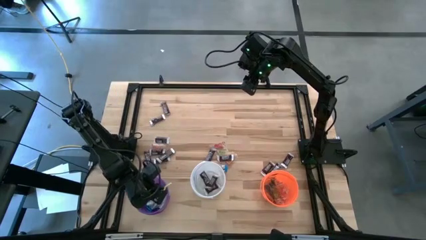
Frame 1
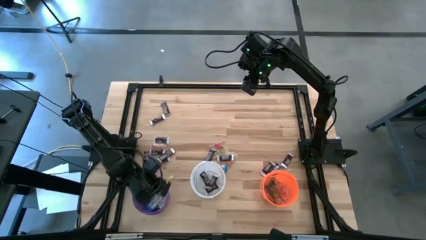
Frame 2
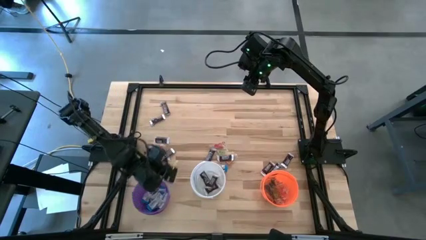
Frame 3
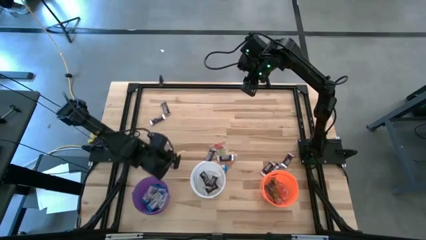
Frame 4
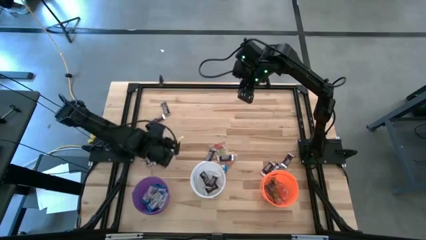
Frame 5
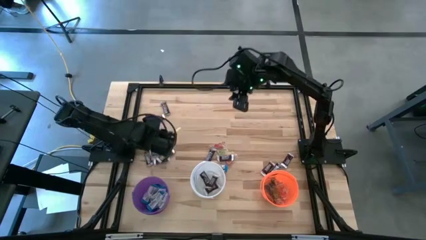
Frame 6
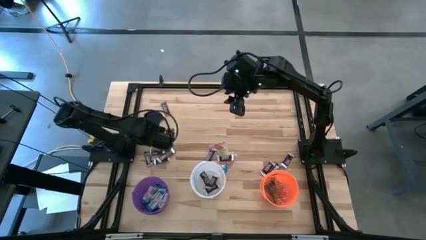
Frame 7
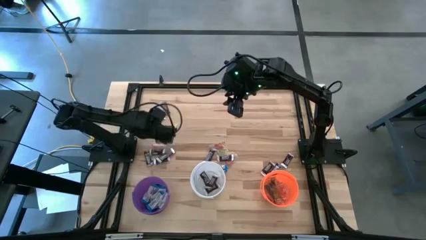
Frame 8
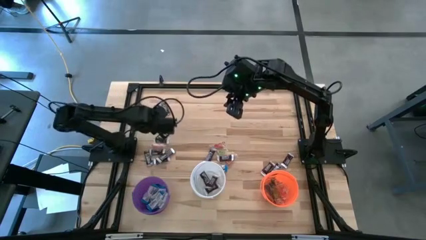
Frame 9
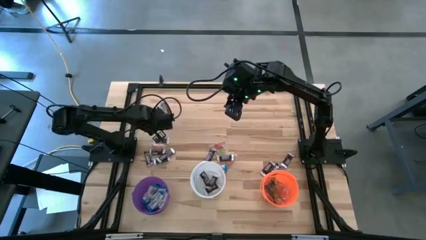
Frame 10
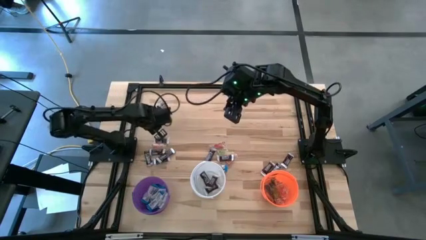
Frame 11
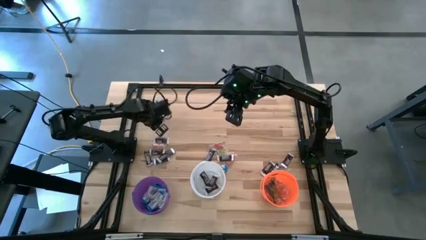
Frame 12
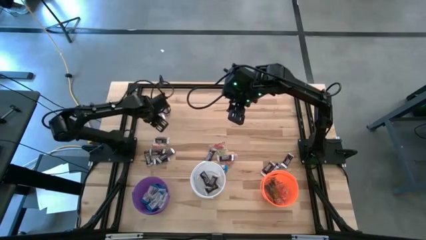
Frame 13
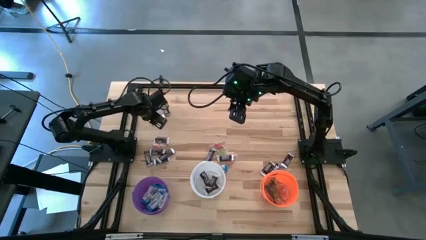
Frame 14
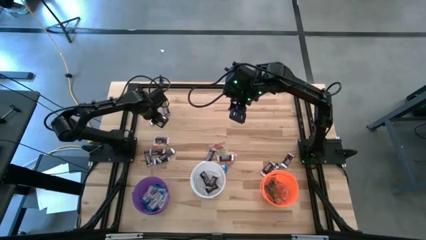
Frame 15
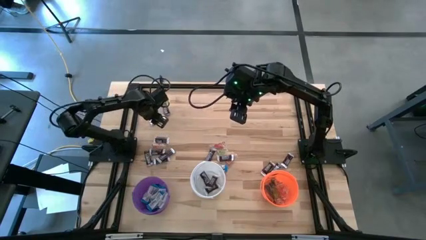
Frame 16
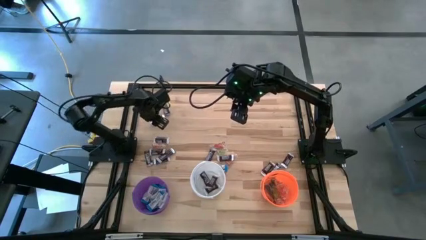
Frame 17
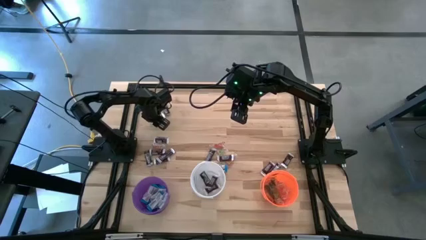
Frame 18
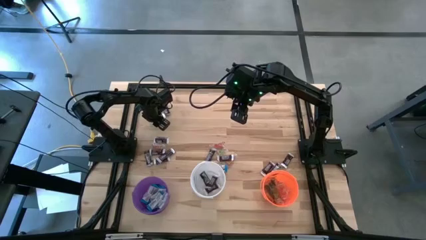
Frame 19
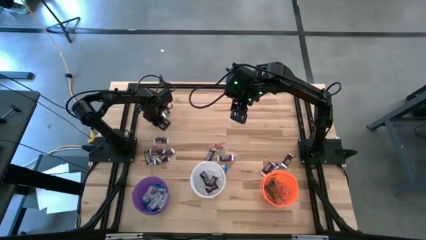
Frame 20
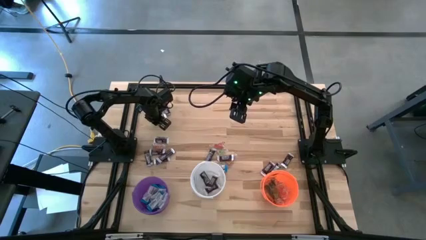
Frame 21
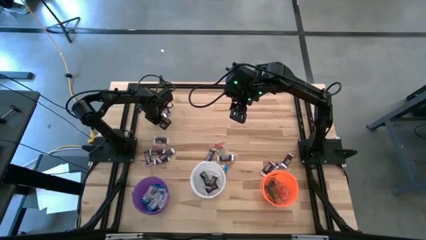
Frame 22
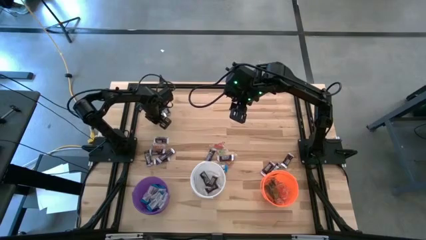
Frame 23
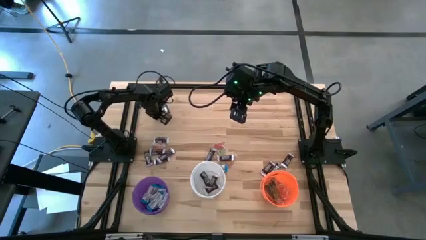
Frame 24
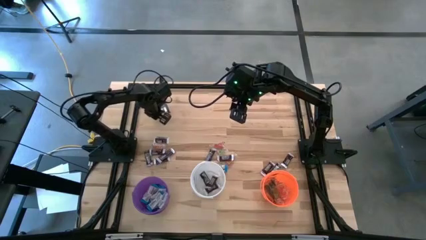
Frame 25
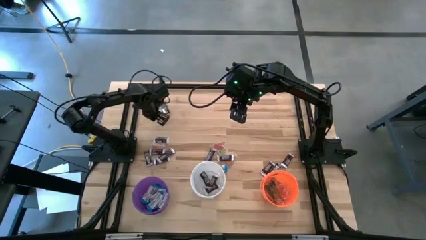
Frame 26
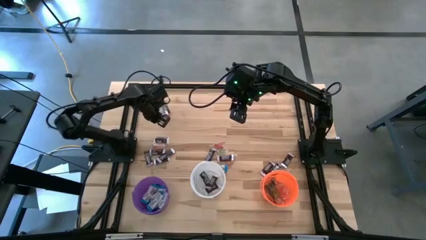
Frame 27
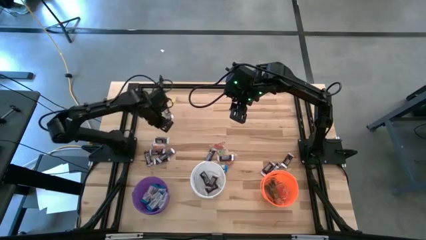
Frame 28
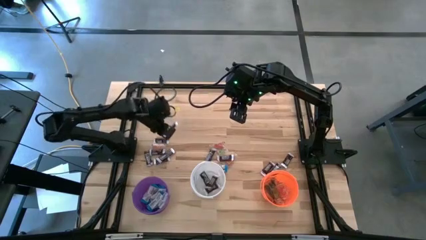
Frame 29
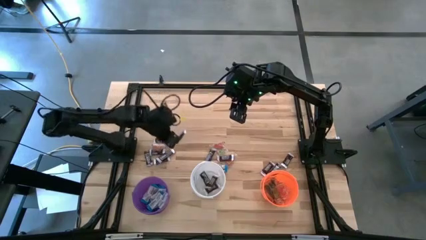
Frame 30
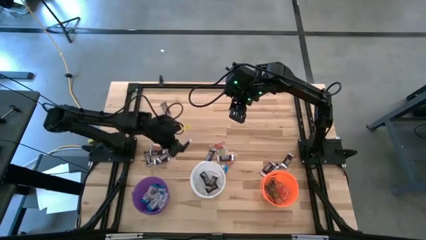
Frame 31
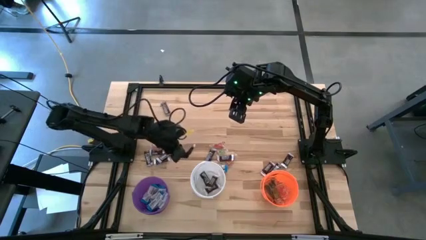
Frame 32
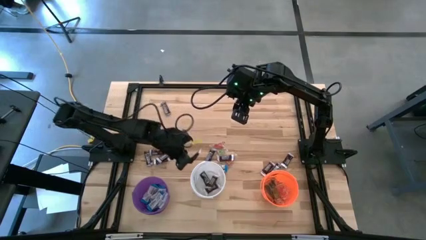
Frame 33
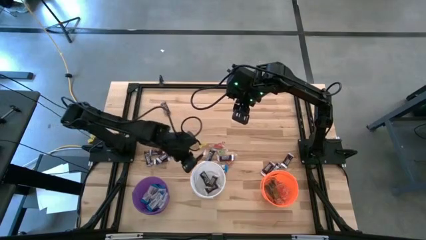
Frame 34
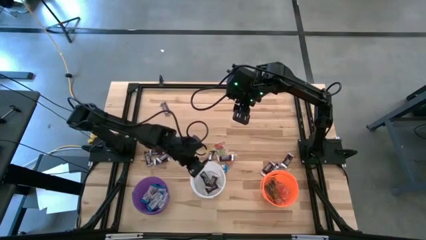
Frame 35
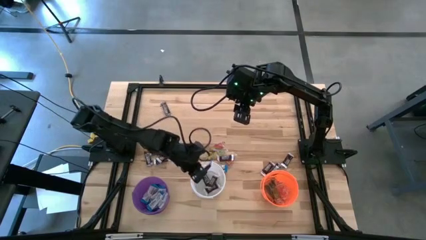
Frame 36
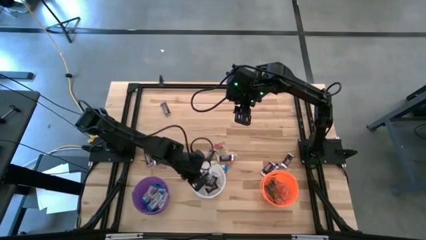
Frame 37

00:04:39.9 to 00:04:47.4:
Task: Sort candy
Put the brown chocolate into the white bucket

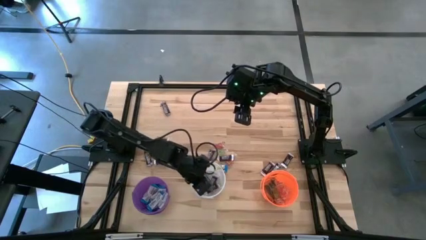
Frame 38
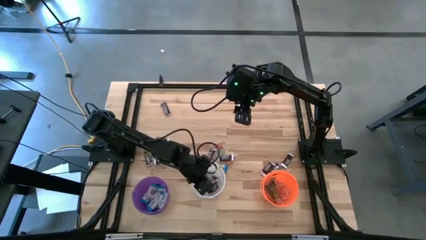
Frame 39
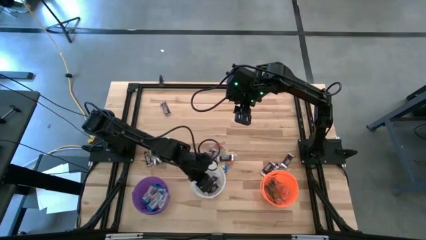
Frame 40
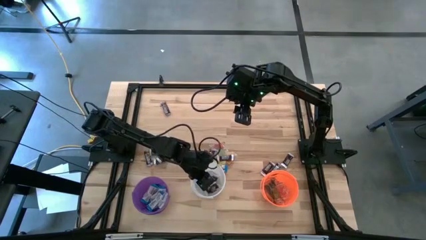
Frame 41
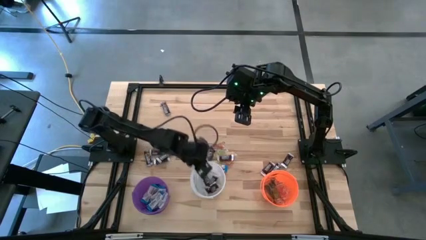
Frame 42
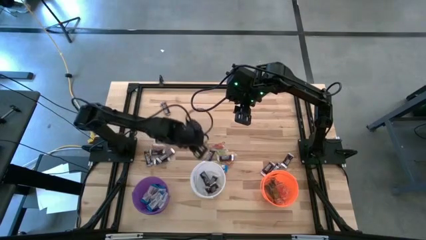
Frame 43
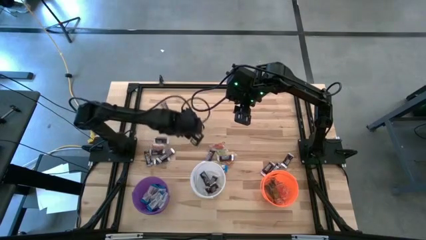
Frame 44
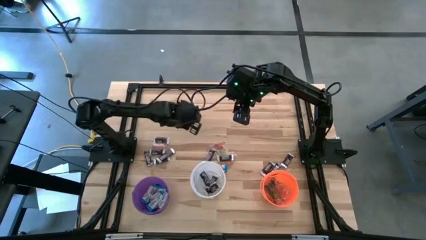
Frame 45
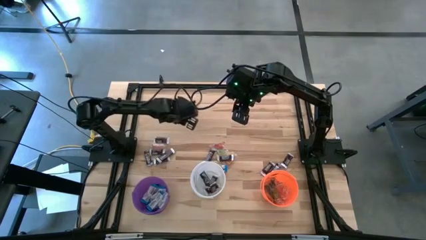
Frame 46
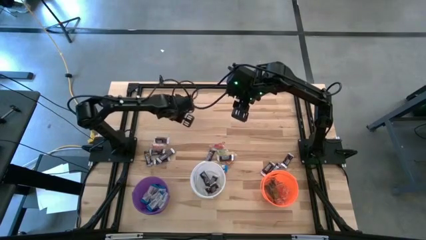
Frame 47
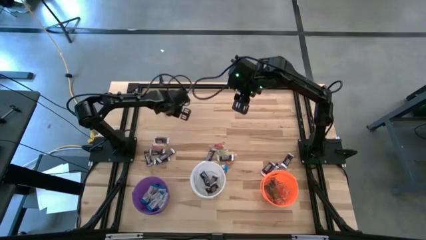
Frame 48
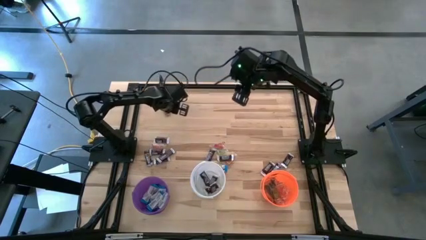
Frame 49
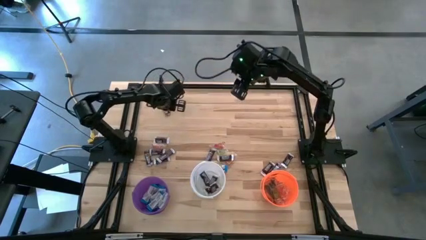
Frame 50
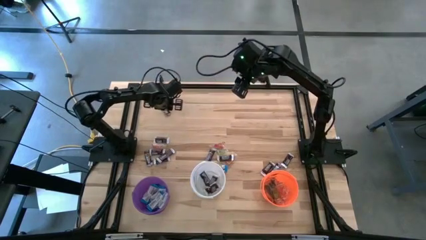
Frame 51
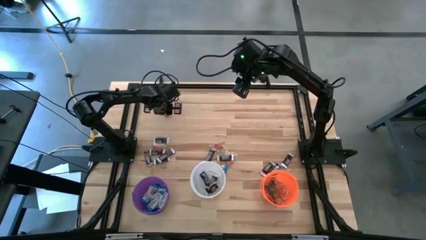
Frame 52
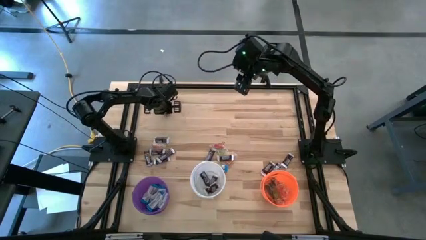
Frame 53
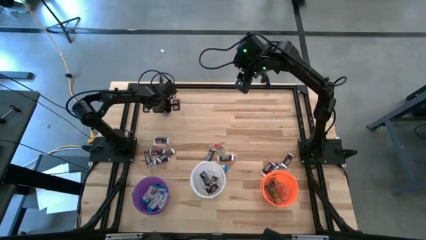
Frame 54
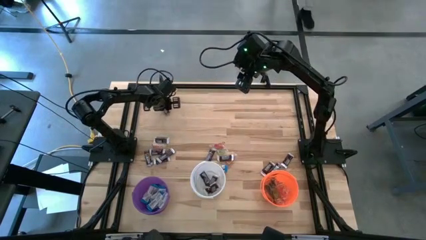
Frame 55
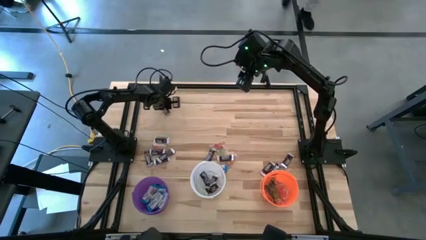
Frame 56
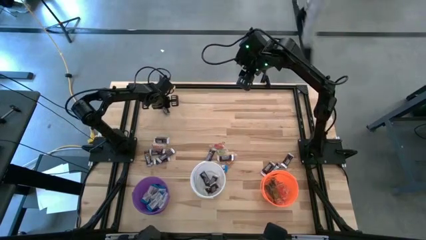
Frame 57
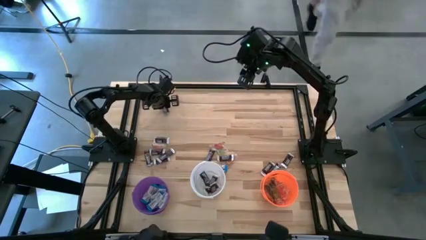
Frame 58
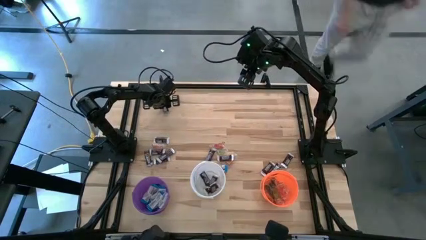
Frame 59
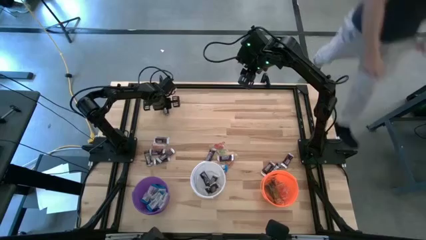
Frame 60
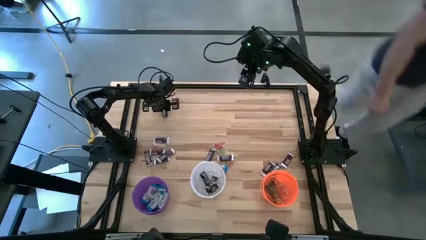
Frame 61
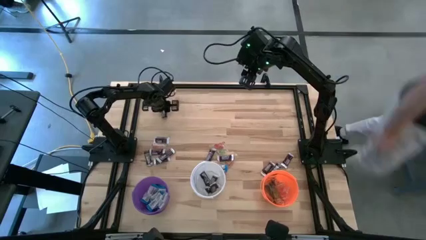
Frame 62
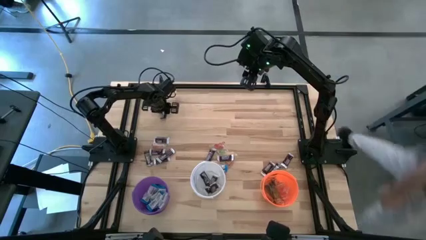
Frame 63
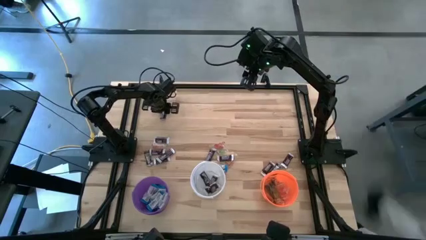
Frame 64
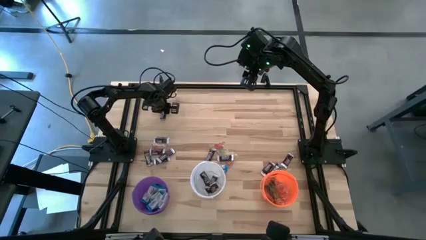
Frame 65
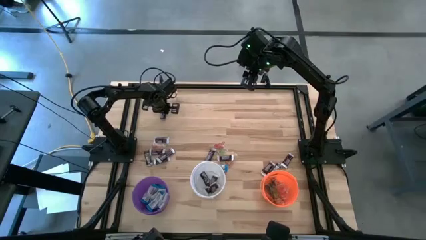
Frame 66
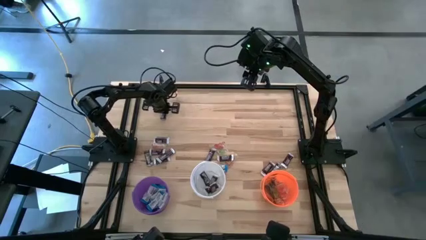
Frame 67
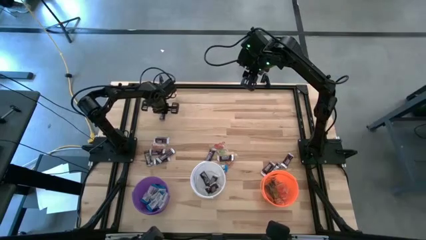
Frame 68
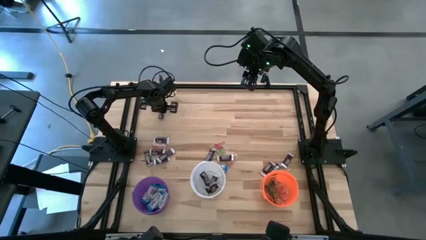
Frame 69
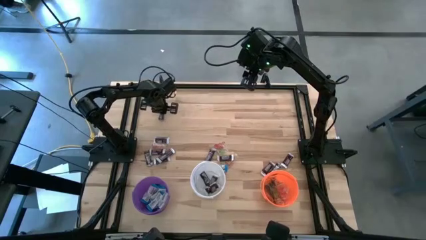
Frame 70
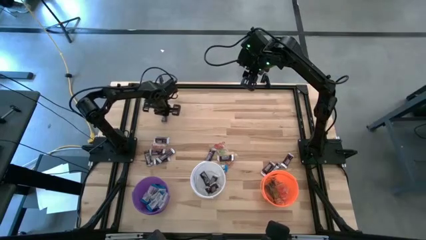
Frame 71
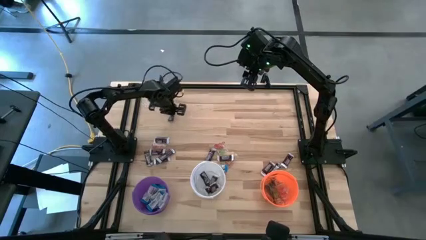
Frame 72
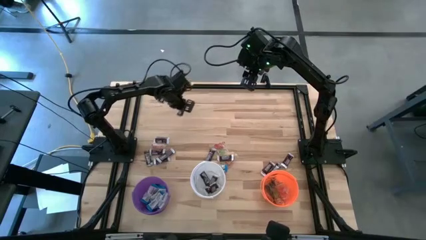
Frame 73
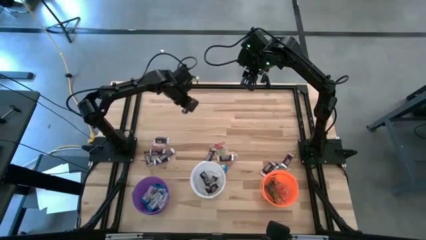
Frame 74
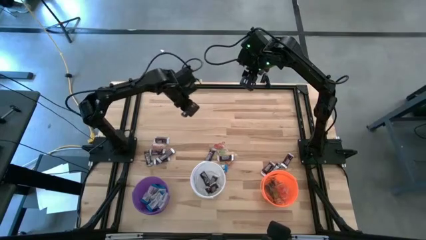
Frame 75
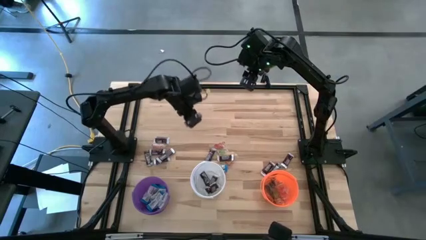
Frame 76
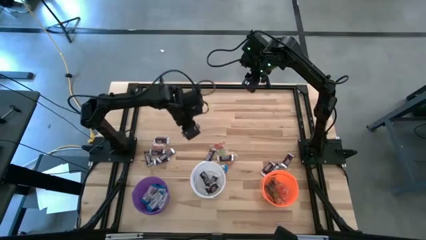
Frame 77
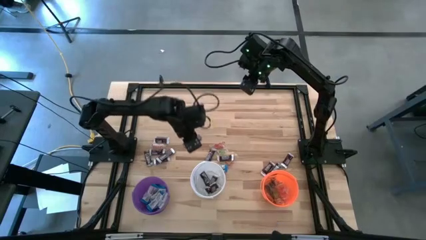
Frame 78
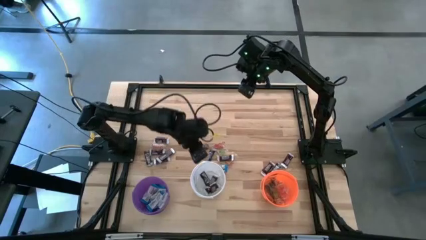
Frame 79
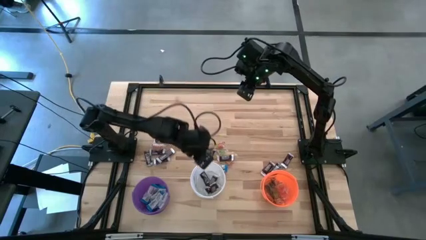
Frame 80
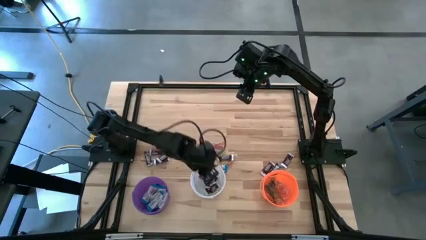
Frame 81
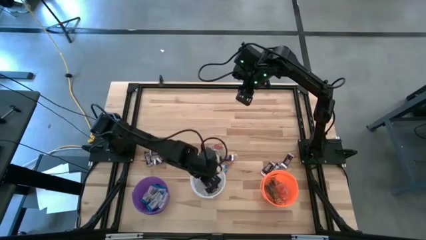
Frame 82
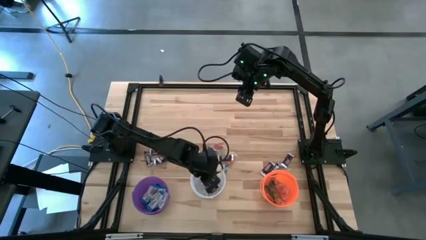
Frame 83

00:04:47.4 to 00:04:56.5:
Put the brown chocolate into the white bucket
